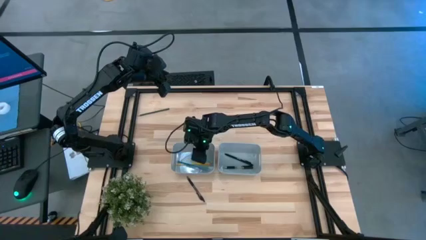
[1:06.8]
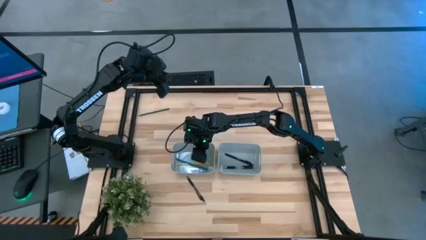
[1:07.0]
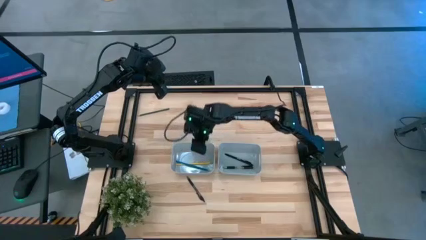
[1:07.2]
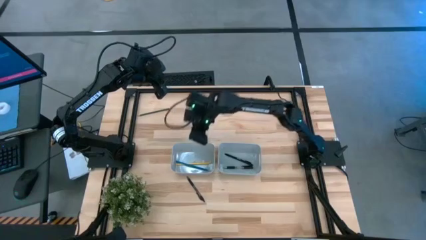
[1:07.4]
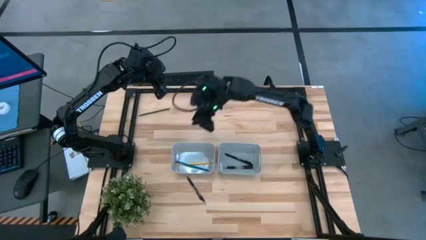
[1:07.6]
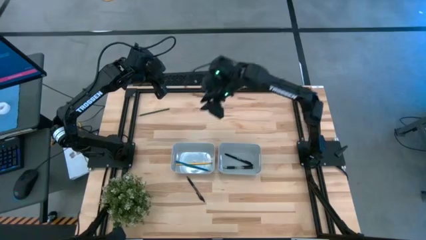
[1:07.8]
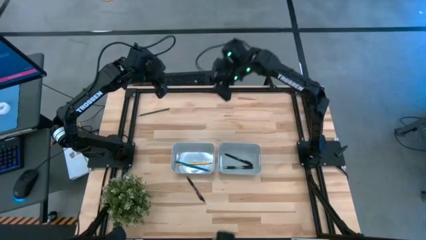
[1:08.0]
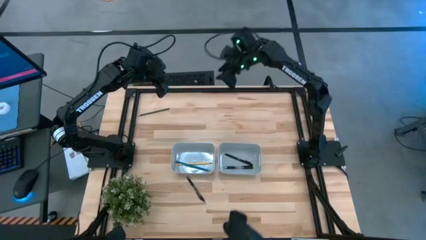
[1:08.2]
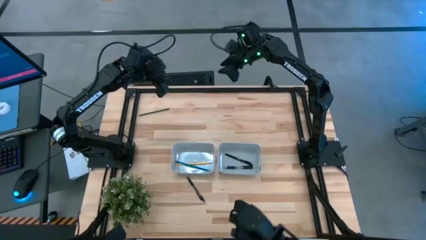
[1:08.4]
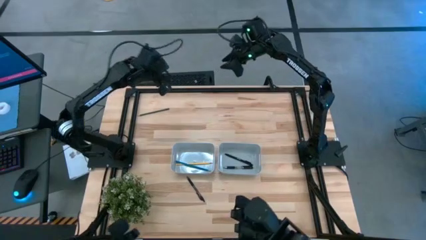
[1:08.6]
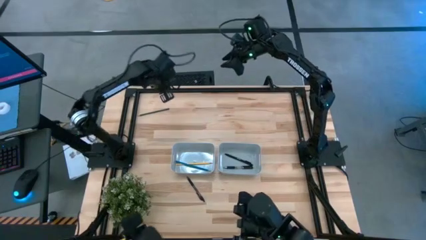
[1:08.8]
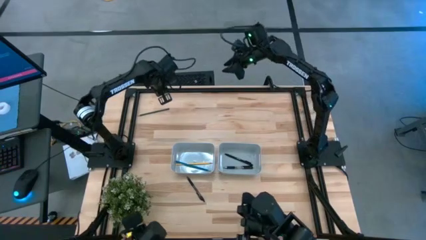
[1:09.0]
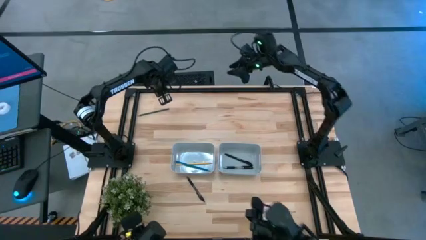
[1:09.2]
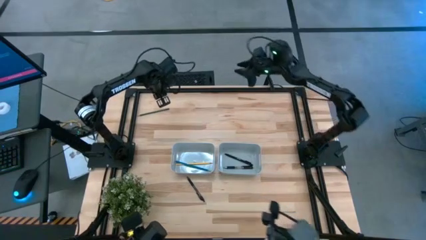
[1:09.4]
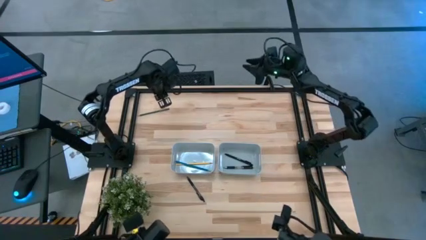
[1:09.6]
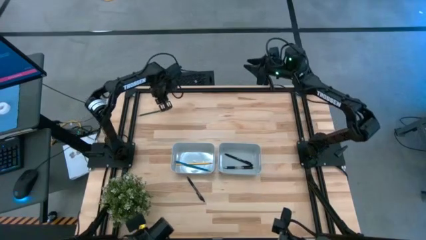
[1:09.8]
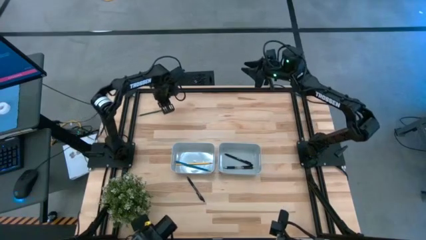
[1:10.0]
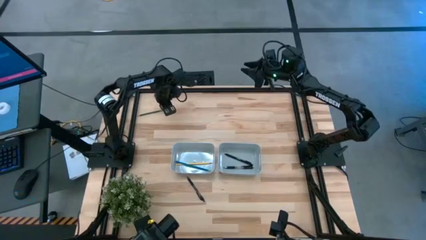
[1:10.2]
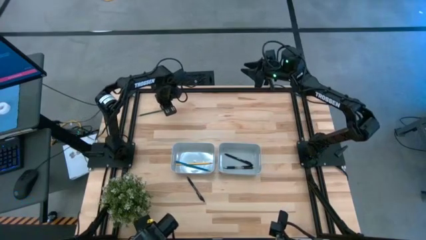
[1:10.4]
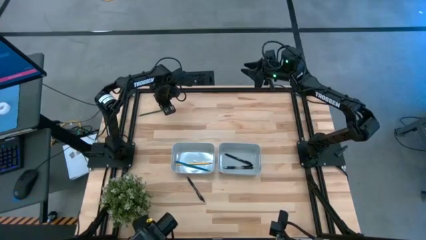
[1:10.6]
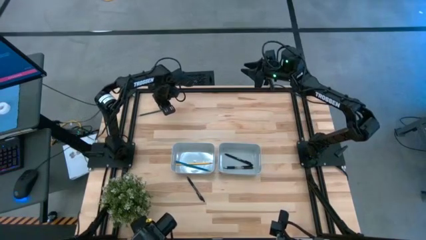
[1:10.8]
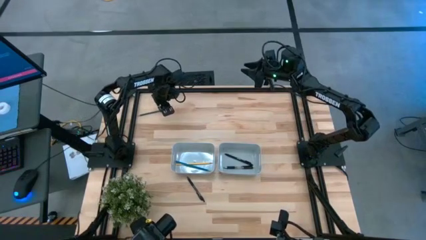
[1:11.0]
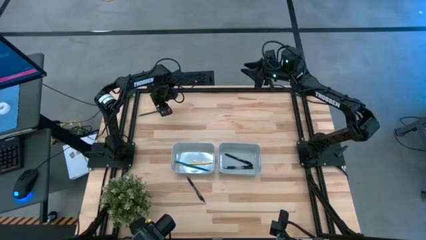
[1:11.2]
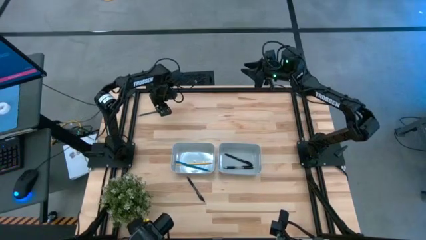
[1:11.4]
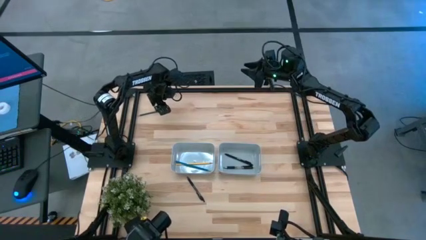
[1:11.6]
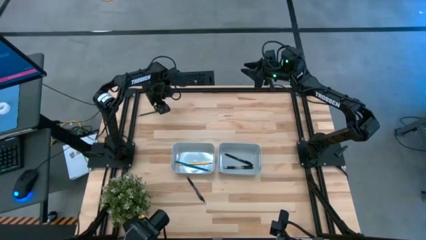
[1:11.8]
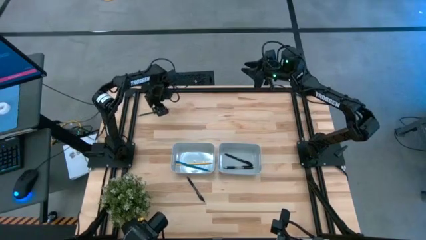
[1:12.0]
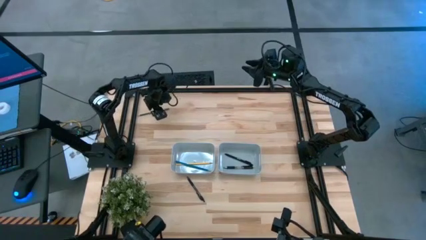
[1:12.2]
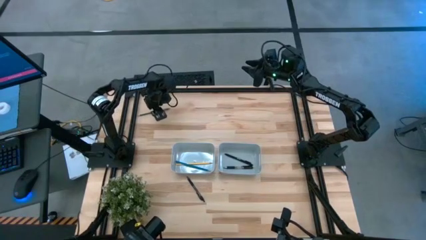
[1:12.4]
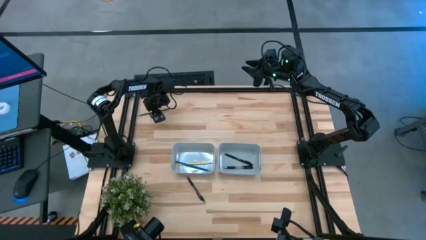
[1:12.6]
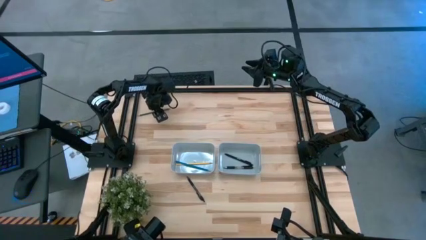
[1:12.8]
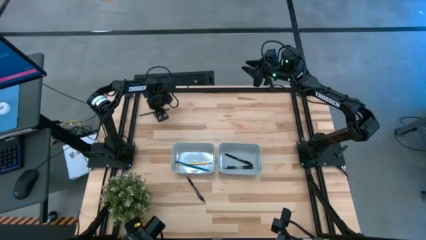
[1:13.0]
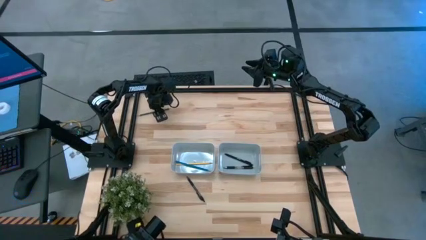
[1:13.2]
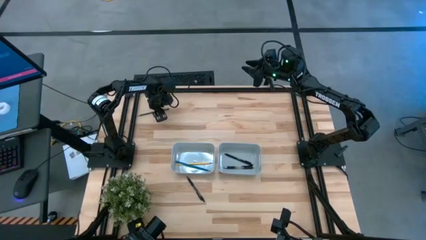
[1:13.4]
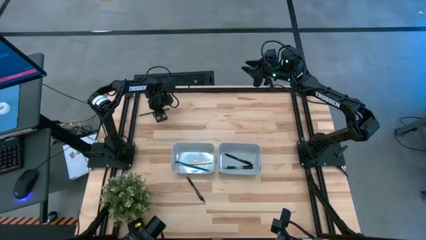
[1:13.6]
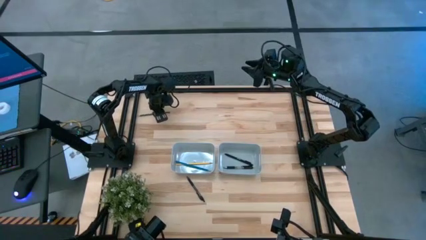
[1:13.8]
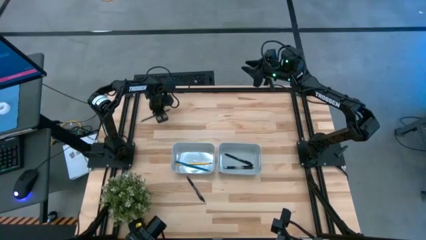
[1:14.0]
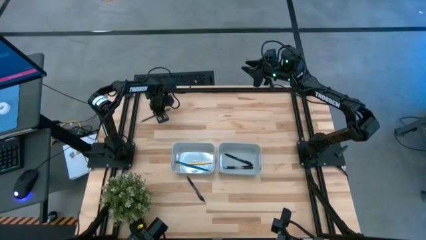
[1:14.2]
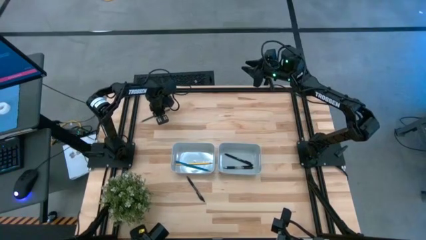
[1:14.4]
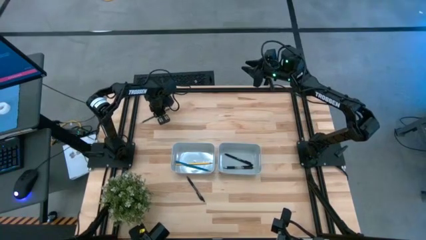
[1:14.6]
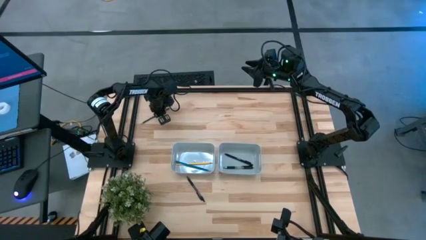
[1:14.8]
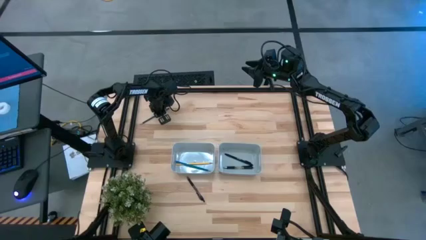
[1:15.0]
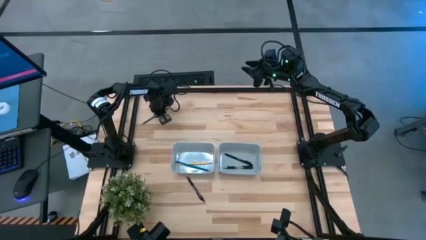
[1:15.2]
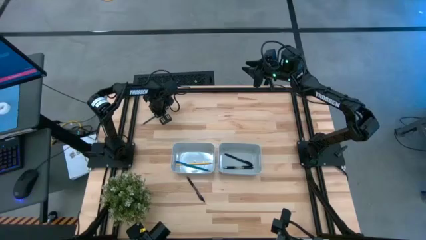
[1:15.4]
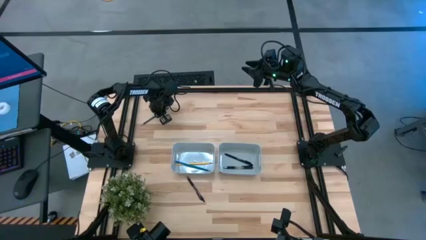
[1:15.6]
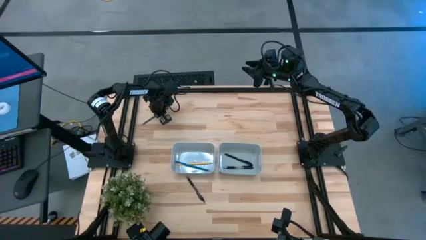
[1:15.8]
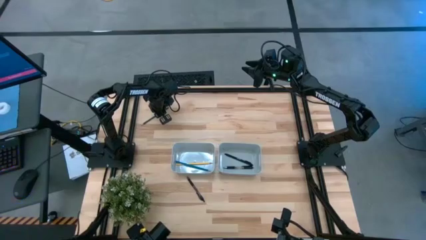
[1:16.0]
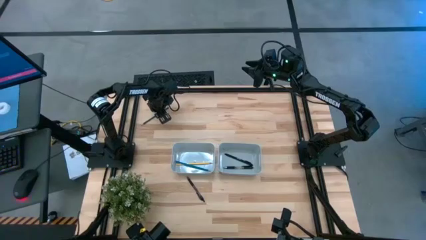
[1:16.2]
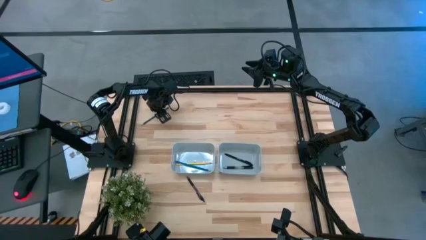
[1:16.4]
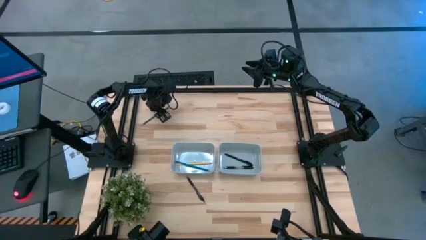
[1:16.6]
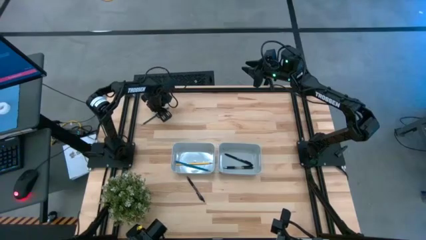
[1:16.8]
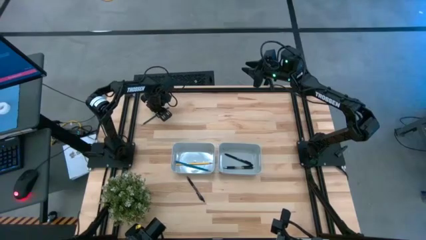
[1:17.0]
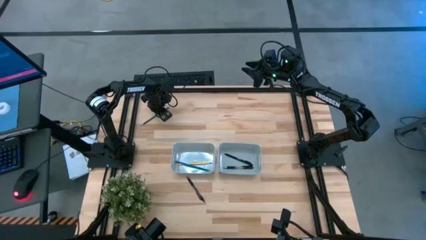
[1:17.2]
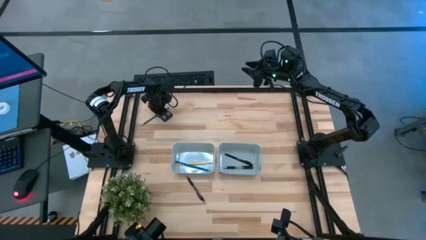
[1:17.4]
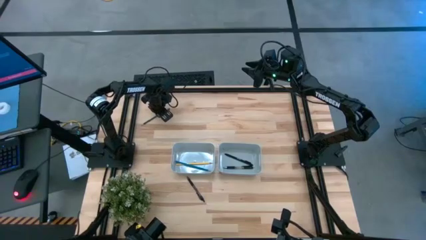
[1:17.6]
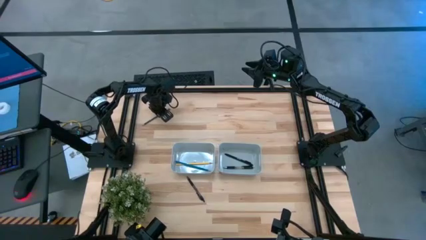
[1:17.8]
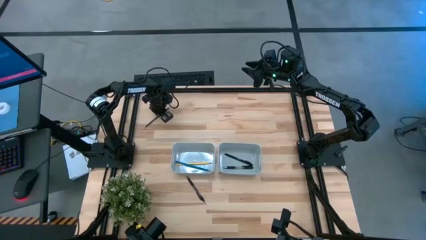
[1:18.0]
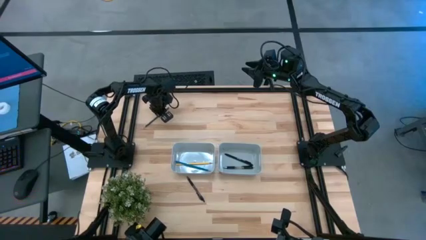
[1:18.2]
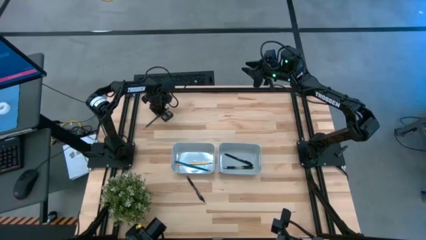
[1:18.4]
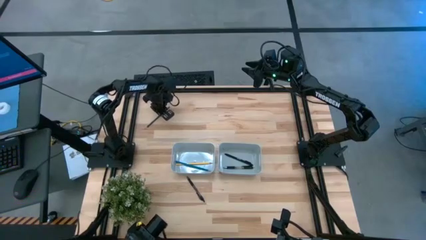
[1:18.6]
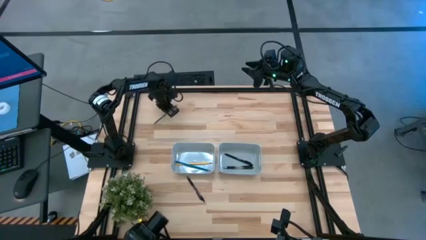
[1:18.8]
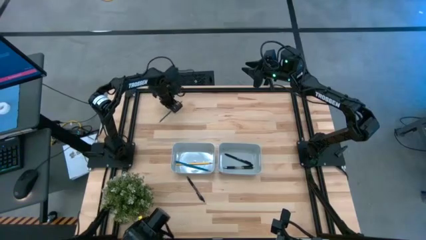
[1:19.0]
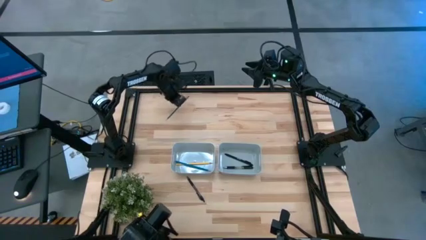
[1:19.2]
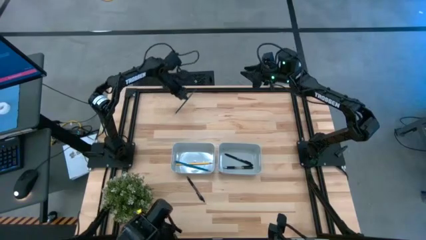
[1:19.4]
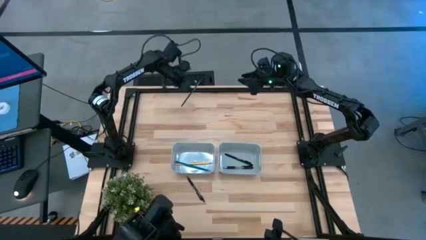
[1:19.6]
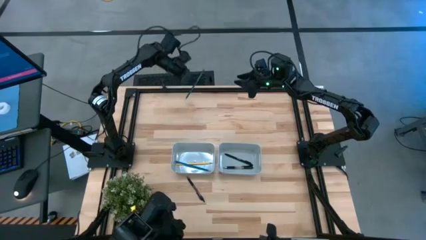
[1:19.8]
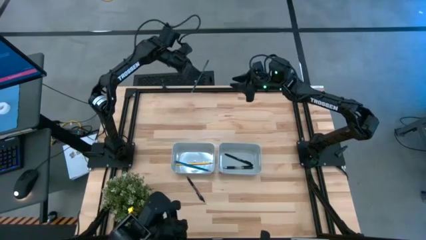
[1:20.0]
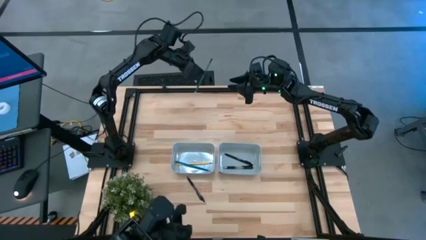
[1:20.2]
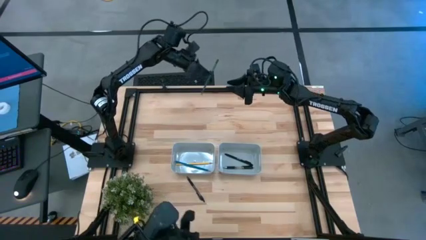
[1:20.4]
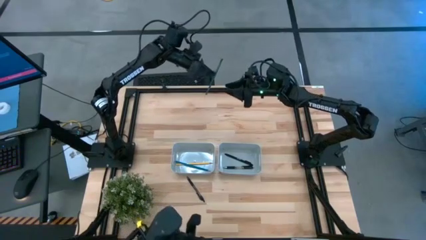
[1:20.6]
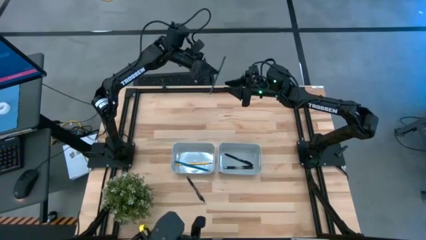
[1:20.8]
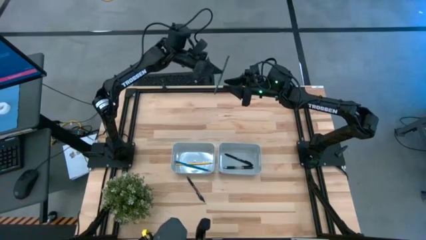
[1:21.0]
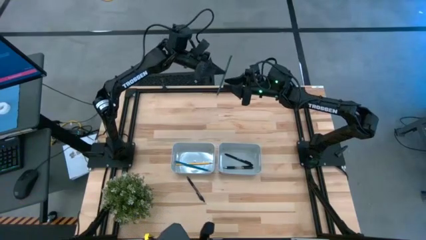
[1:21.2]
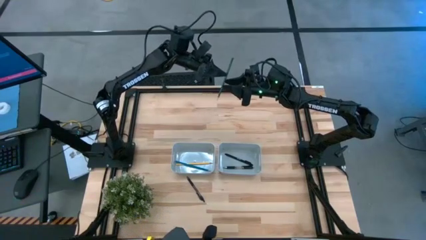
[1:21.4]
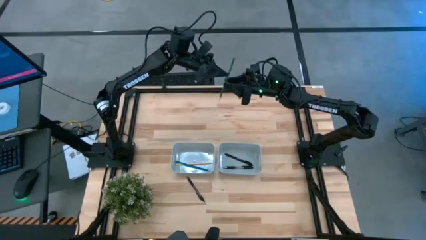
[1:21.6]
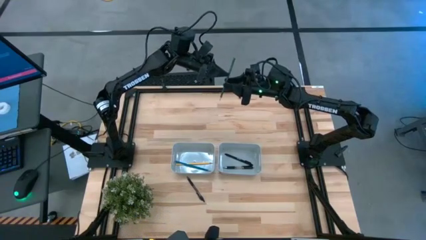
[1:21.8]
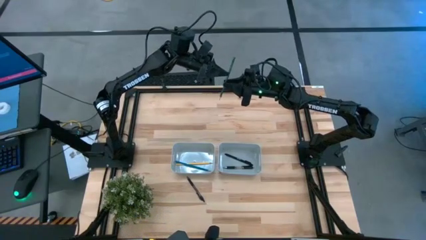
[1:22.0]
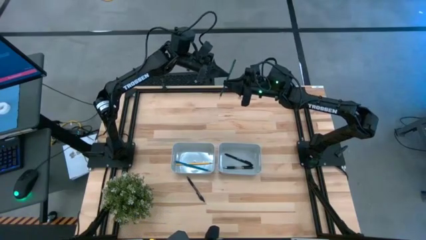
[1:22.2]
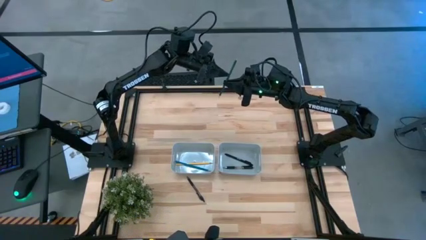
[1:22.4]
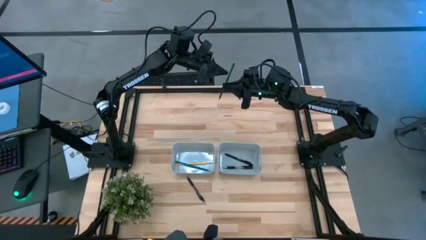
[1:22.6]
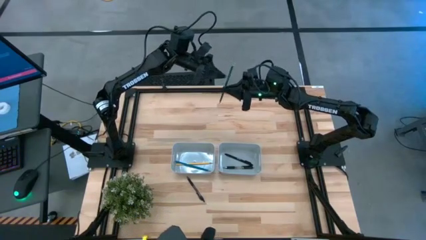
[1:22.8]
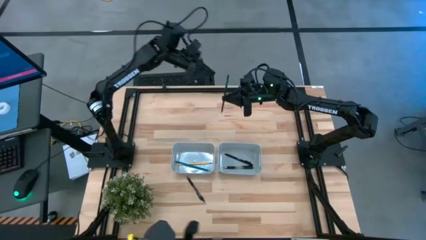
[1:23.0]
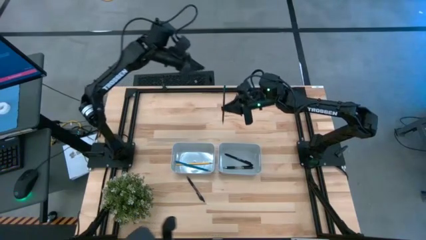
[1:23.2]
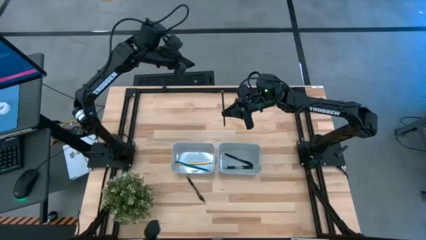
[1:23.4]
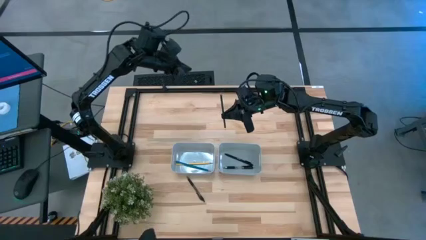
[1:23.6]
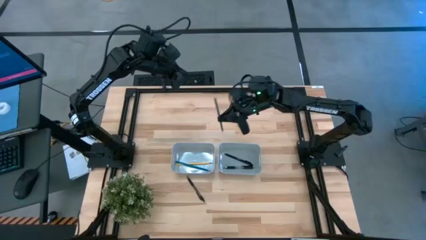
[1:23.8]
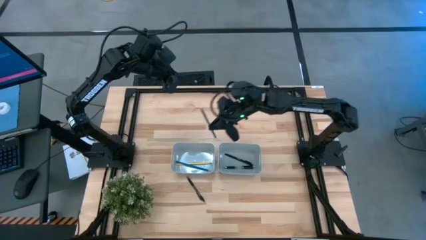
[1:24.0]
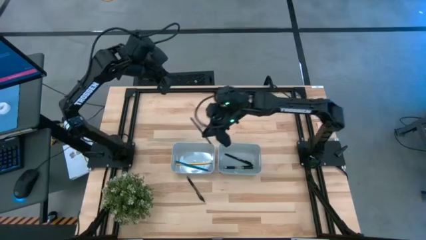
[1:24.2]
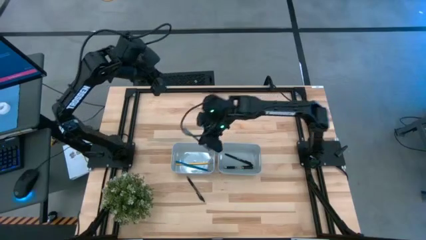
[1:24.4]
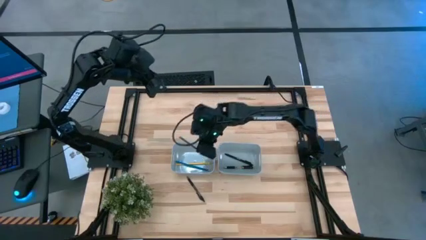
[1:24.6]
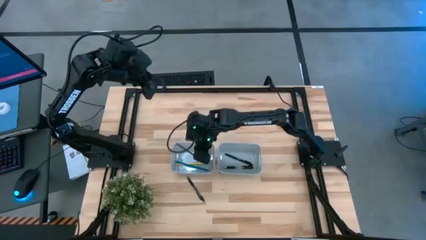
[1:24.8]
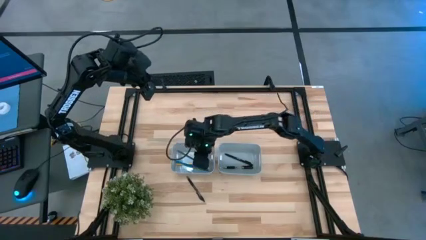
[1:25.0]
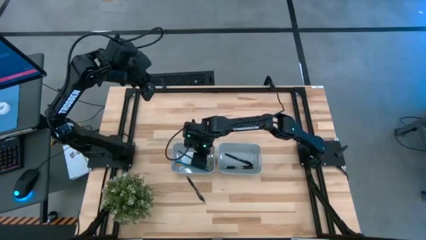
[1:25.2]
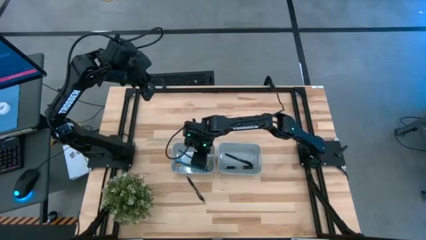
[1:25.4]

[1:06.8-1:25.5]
Task: Sort pens & pencils
Put the green pencil into the left gray bin
